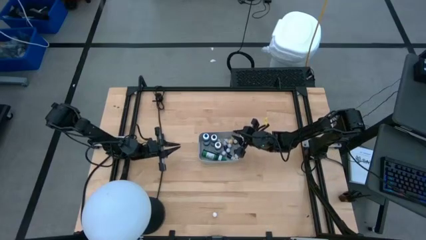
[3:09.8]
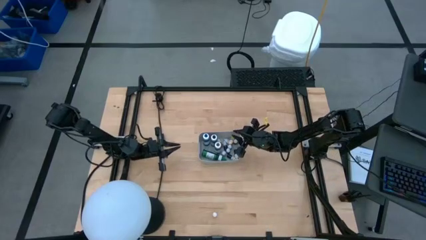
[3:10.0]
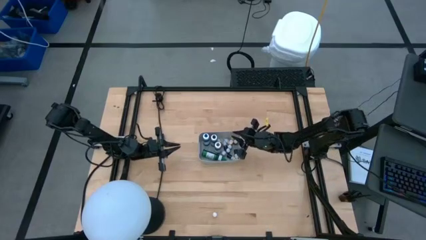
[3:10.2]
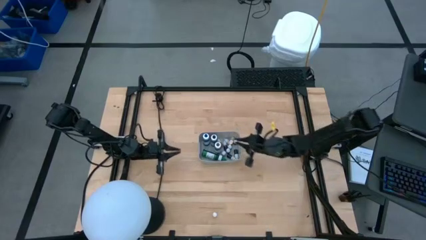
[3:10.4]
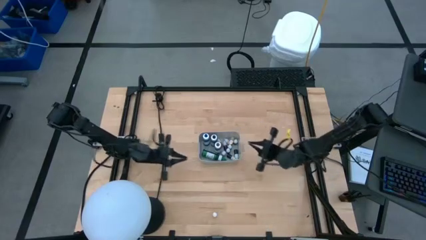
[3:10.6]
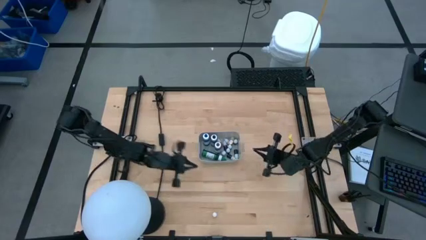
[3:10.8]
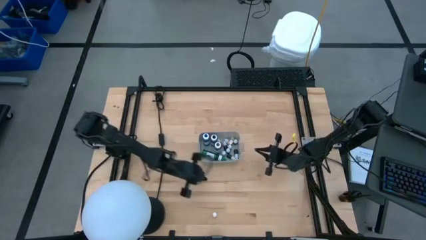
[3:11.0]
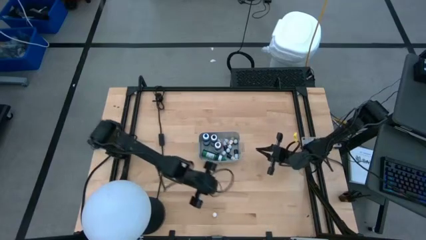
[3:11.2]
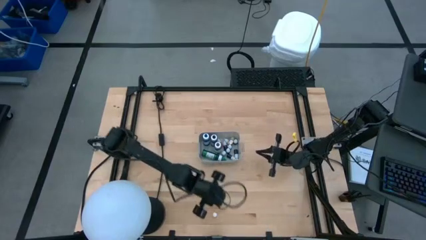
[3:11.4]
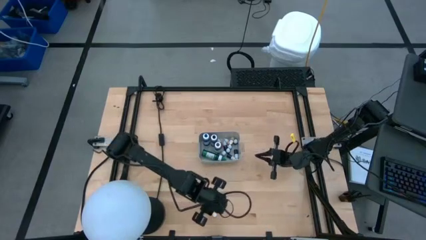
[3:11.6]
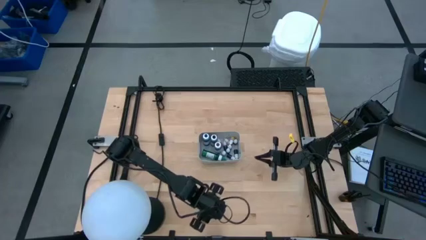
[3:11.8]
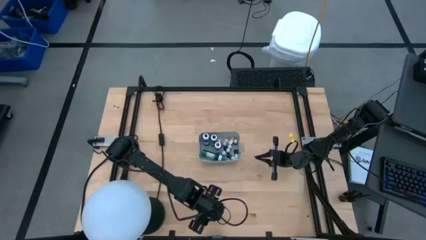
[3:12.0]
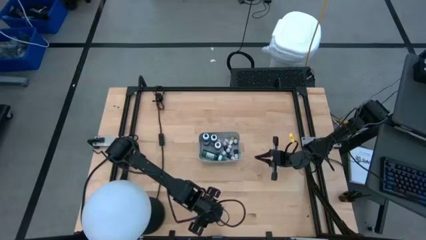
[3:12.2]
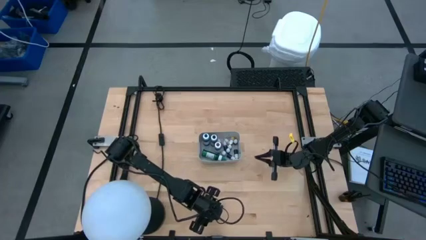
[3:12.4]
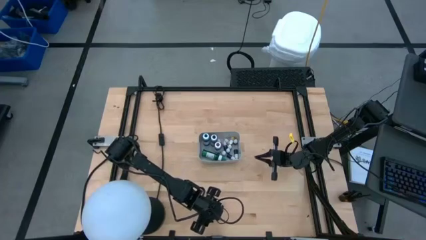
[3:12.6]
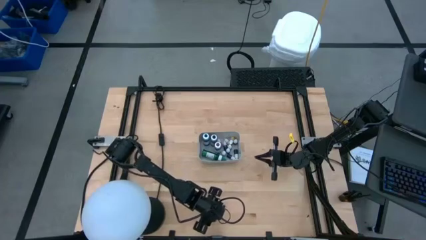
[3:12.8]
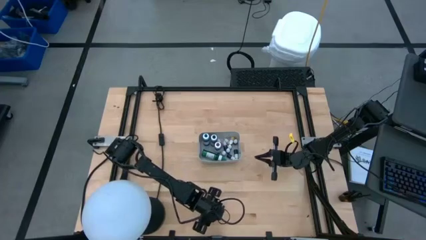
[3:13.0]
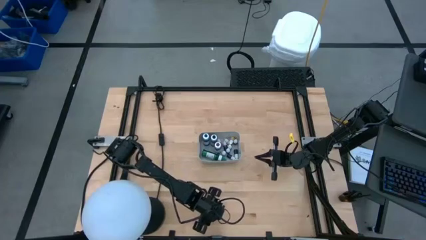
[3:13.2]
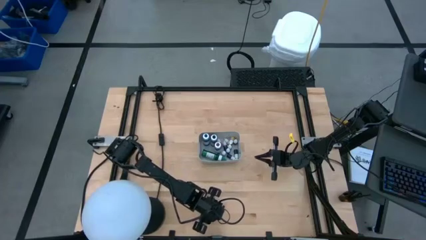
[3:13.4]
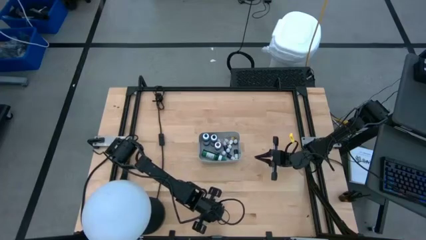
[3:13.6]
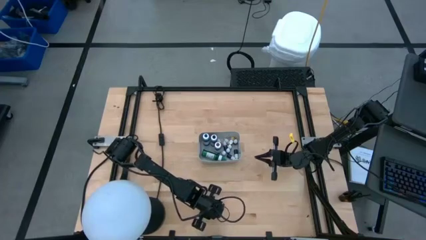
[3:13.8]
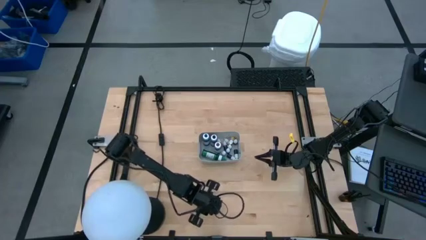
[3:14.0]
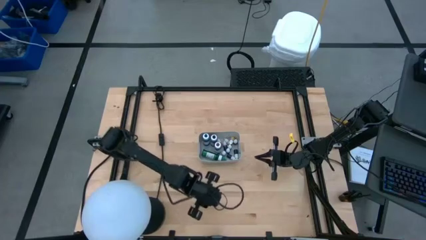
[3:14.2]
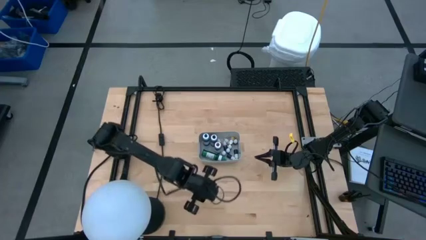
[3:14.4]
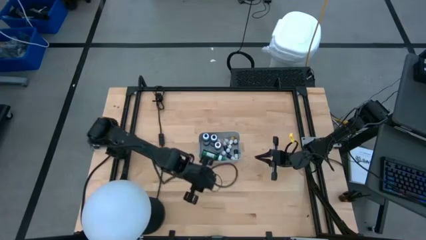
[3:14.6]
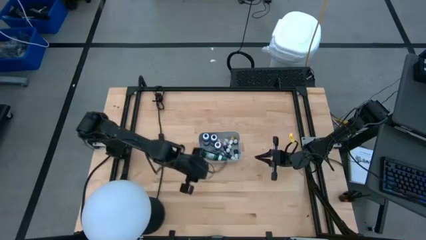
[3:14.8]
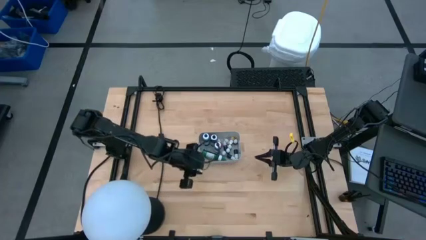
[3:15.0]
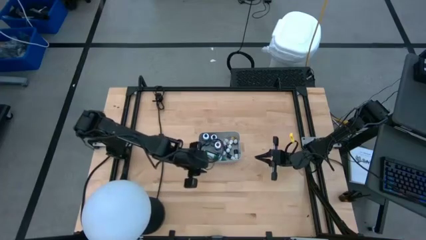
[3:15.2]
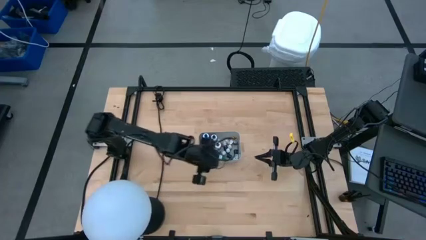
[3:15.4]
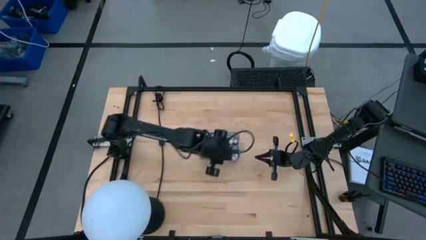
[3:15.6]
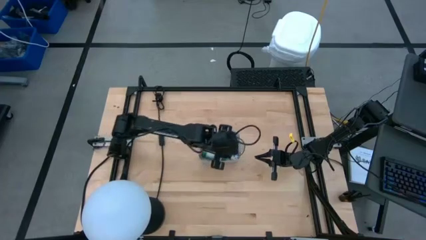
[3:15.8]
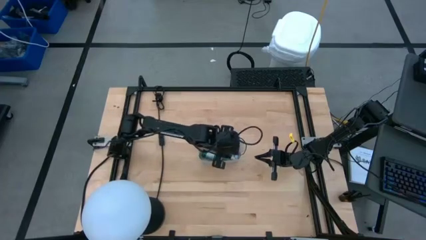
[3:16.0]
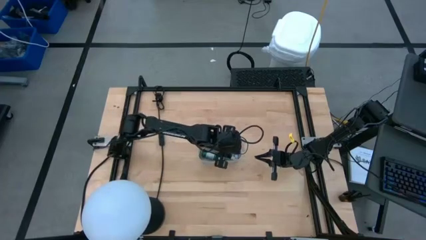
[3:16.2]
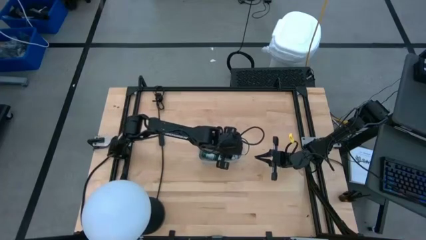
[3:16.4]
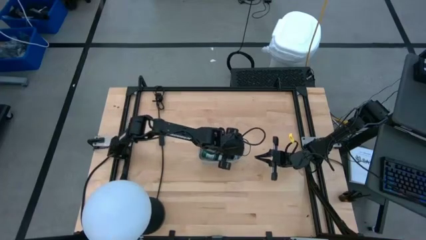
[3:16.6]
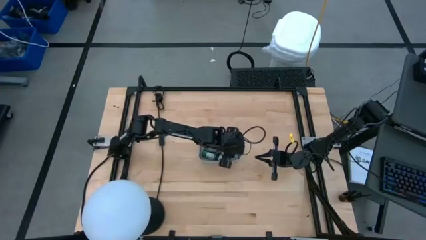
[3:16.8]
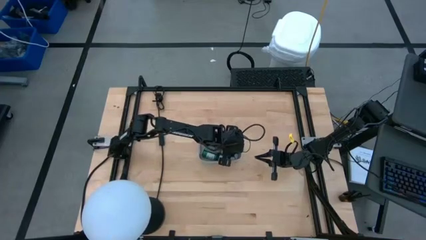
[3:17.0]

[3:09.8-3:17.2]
Task: Pick & Place food coloring
Put the small orange food coloring bottle into the gray bin

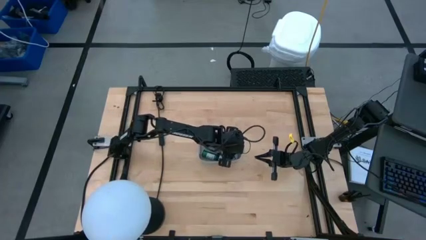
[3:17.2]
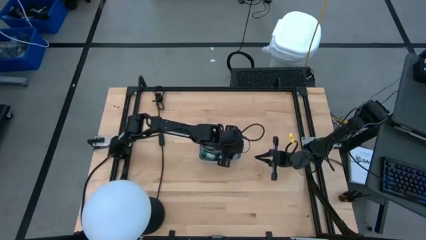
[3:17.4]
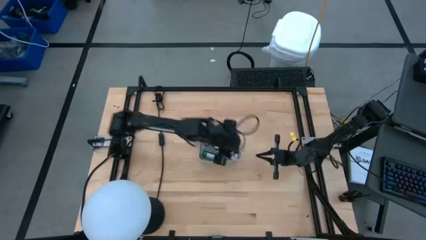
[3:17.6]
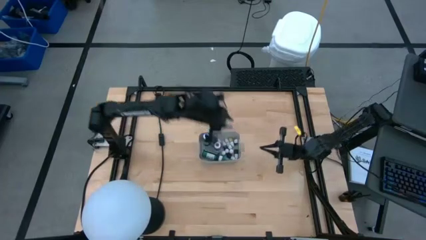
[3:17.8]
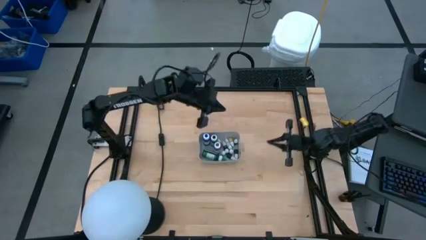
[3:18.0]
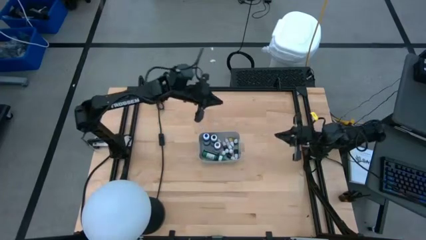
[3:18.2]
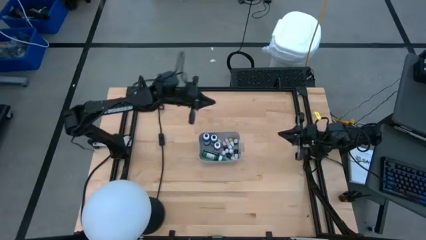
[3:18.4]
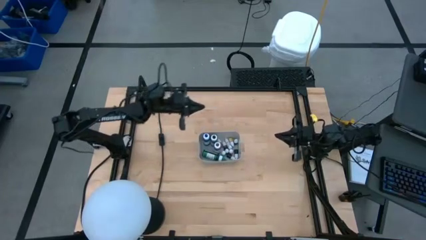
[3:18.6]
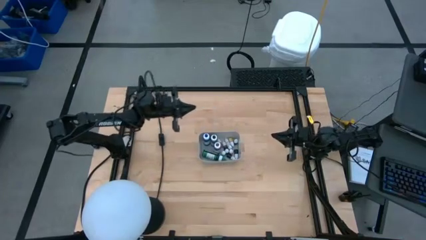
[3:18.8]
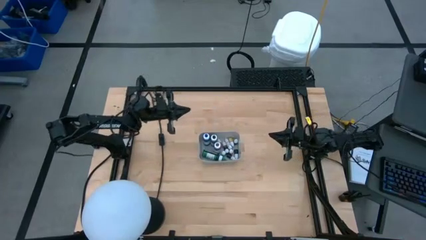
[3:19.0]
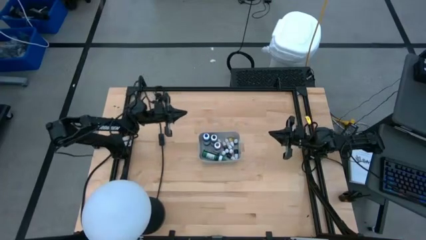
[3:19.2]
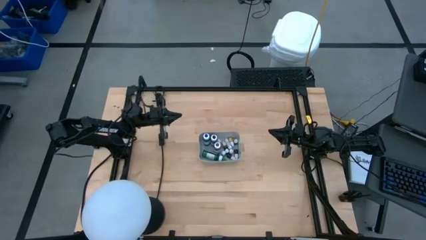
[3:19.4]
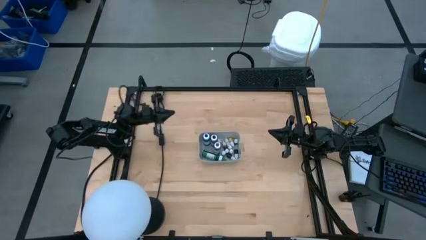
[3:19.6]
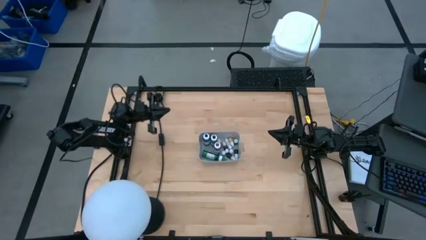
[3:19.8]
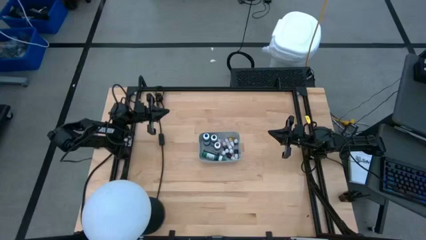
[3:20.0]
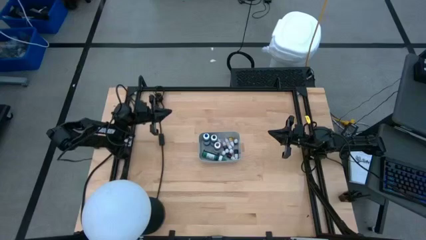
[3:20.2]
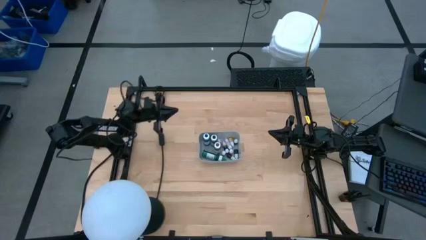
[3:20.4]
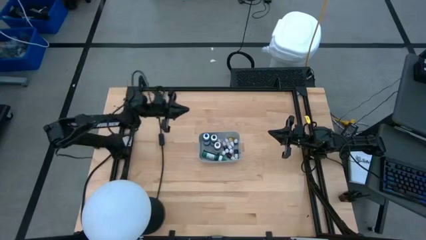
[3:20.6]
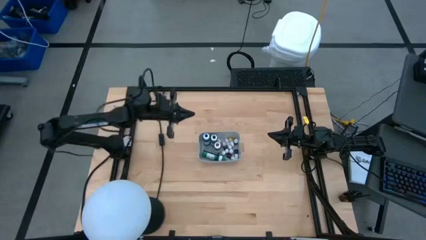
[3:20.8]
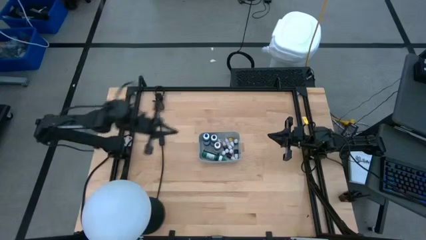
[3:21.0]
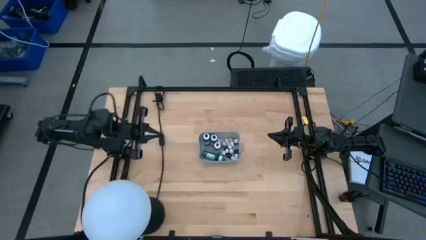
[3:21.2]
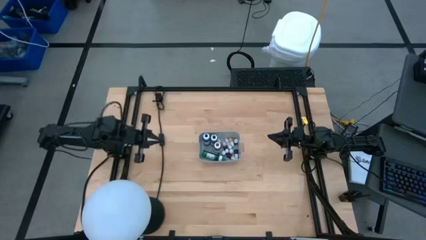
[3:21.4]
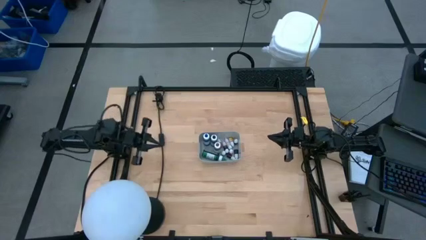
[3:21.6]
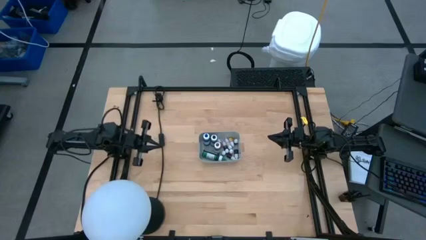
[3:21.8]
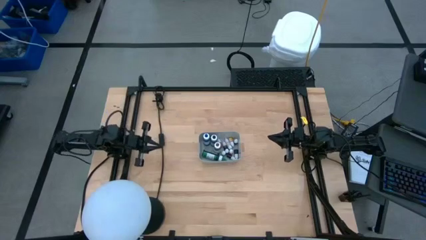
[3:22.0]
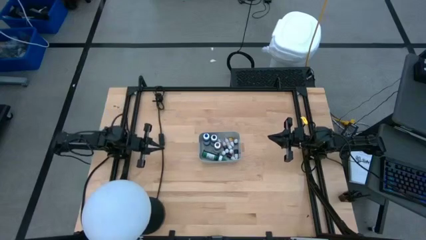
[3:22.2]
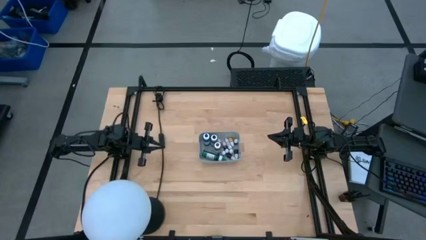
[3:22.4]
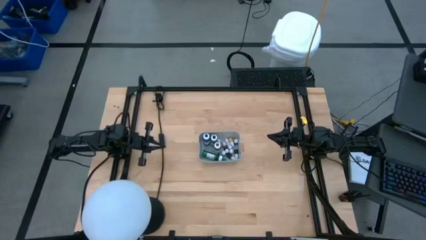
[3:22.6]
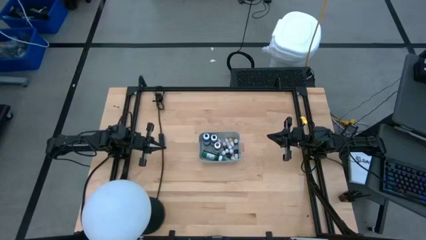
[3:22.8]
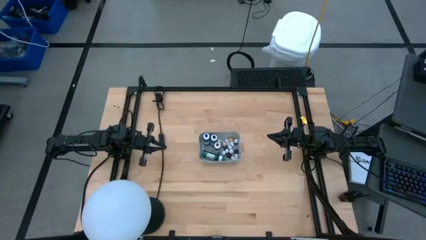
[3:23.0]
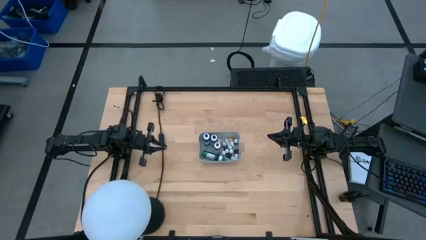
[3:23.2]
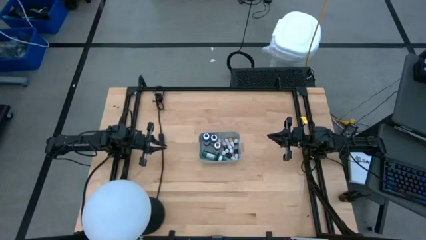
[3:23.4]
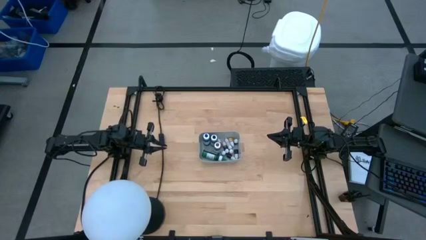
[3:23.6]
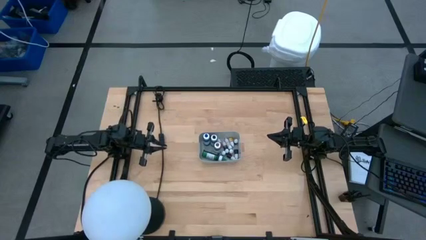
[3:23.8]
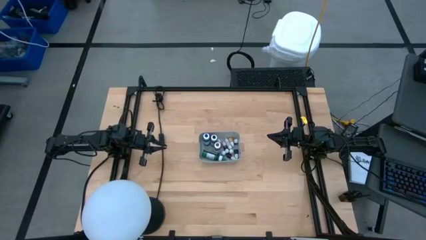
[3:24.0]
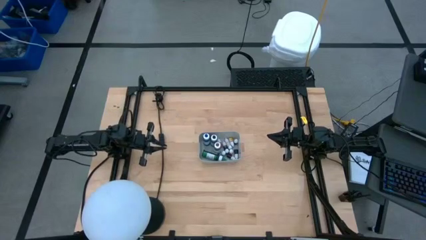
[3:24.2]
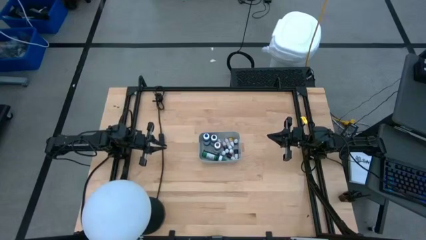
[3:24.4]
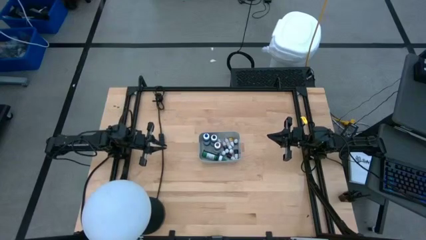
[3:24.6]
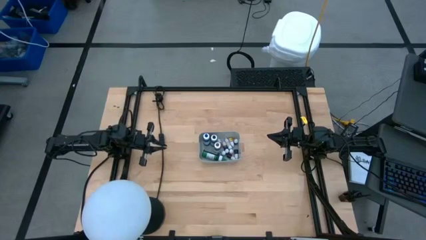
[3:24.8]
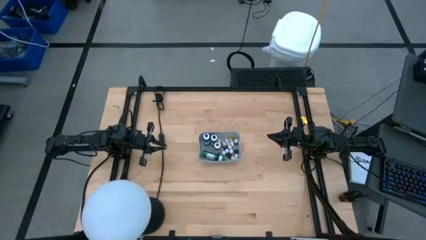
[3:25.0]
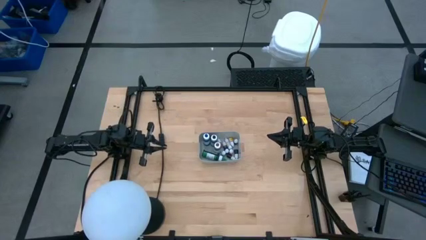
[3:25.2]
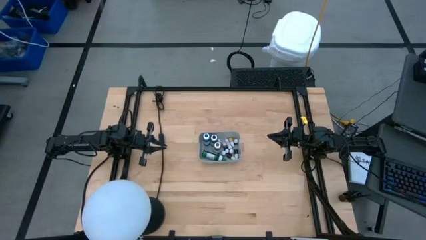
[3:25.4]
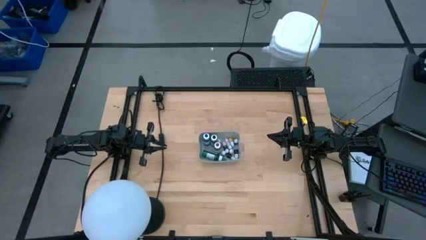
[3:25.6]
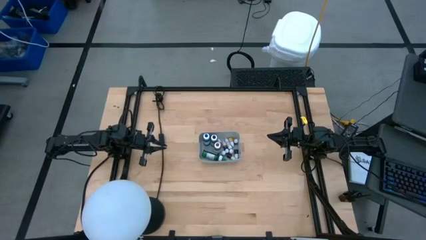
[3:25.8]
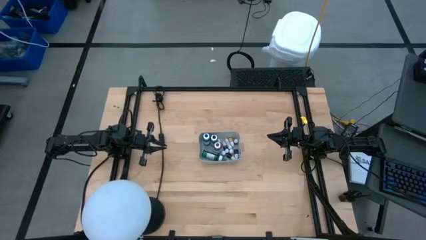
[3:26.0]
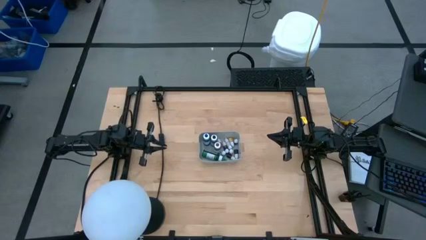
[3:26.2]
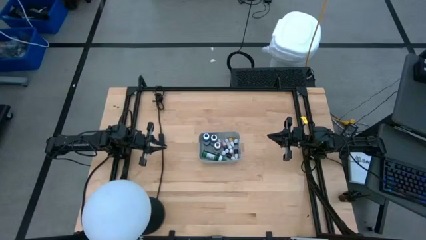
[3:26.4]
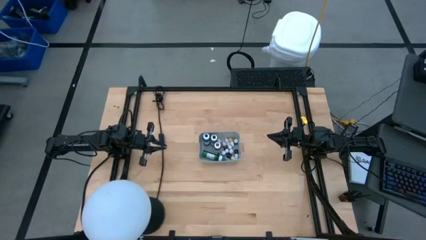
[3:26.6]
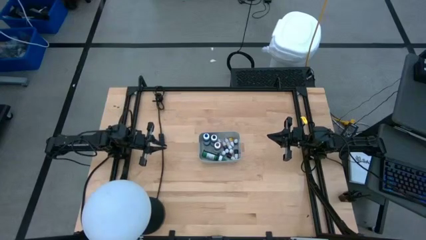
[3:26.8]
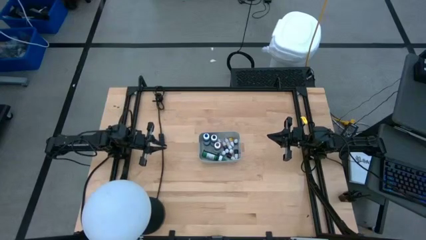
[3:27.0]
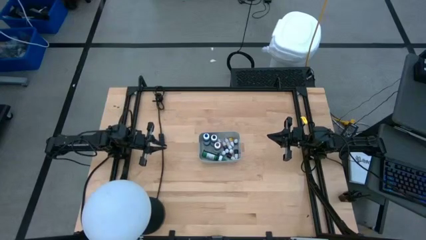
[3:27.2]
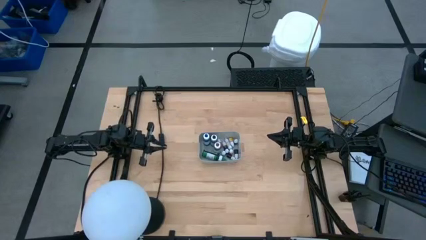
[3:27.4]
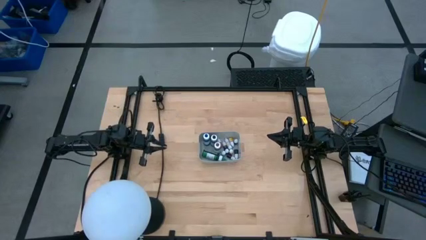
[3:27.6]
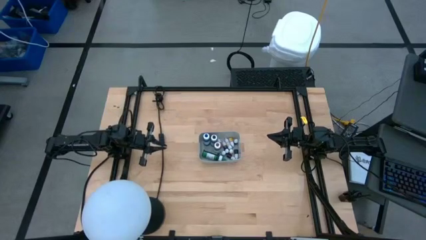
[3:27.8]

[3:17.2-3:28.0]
Return to Home Position
